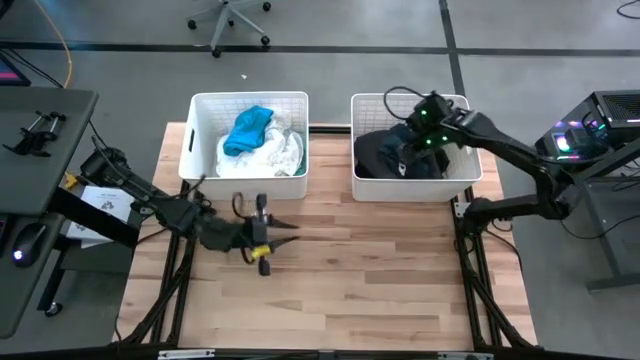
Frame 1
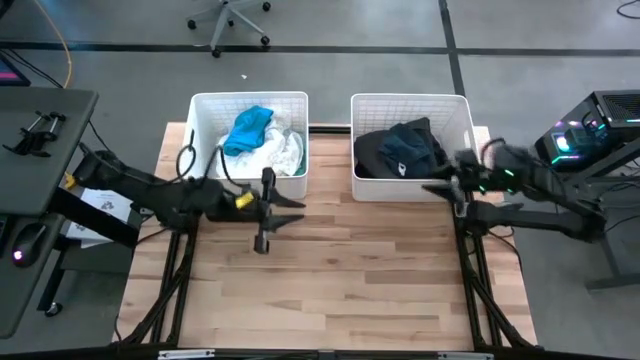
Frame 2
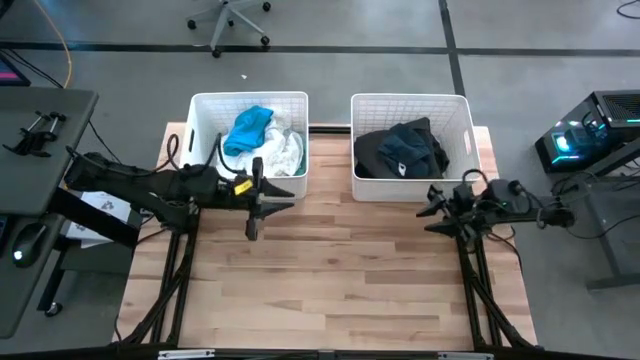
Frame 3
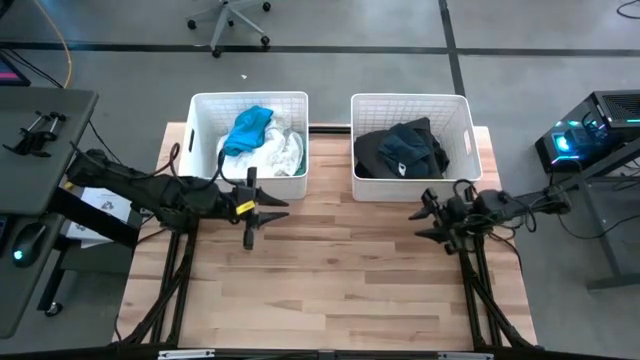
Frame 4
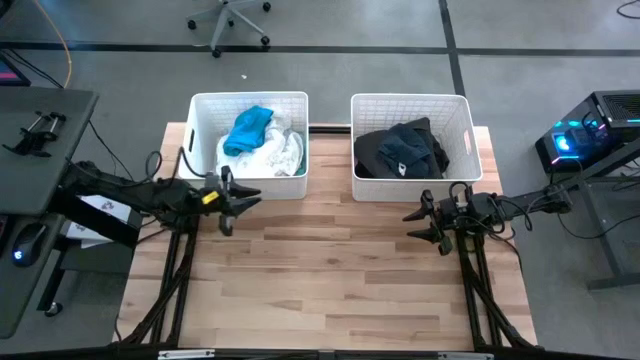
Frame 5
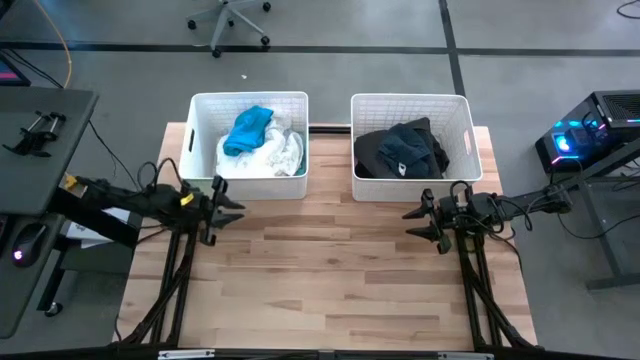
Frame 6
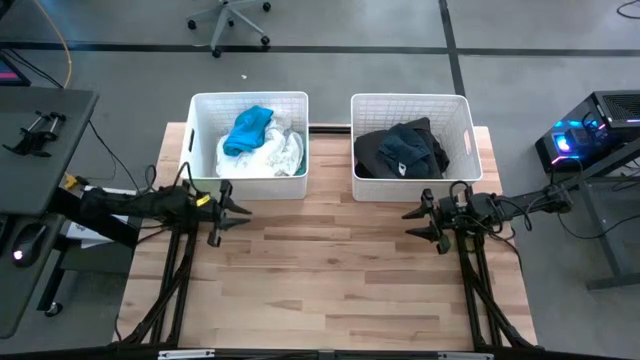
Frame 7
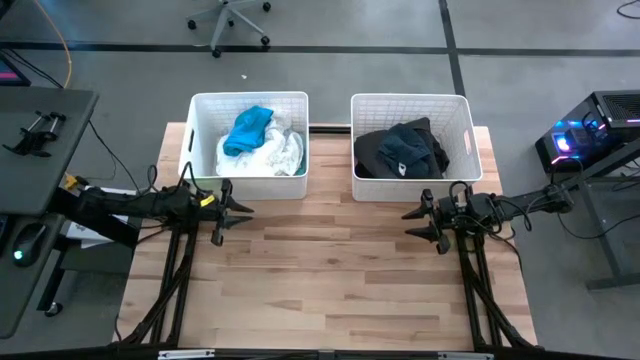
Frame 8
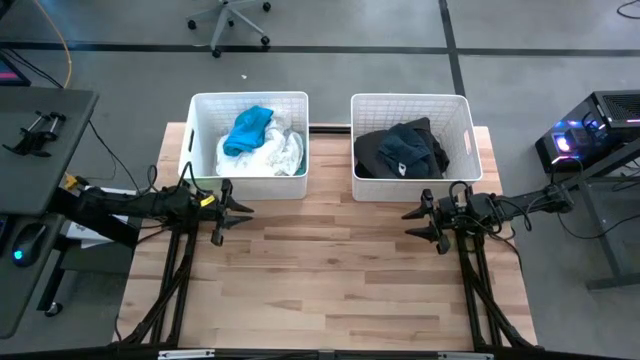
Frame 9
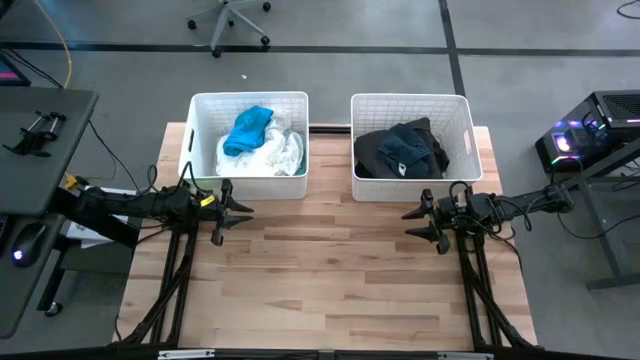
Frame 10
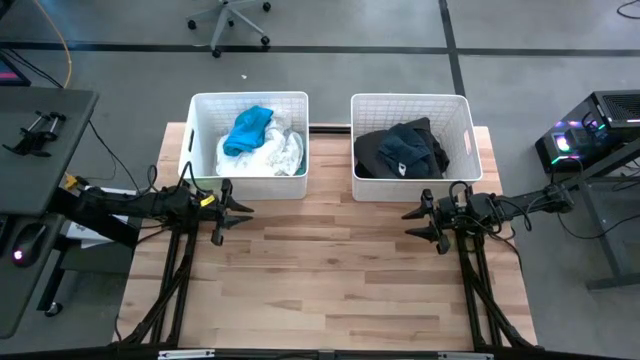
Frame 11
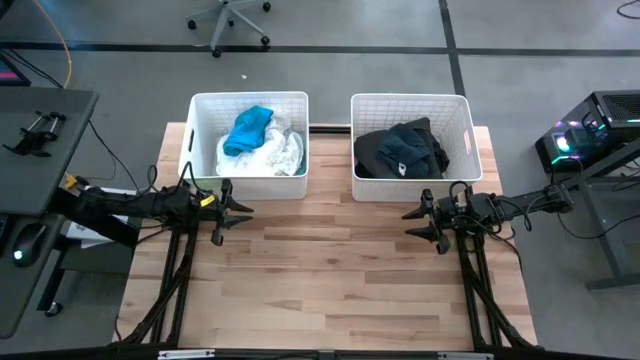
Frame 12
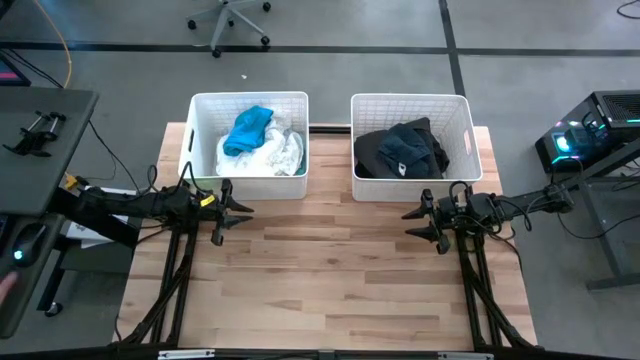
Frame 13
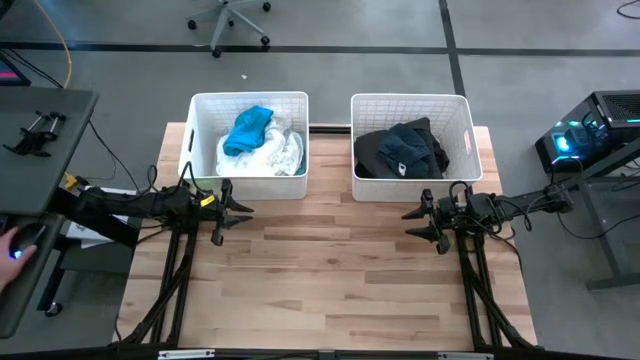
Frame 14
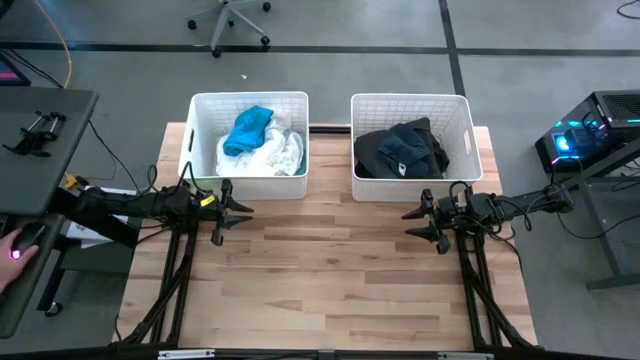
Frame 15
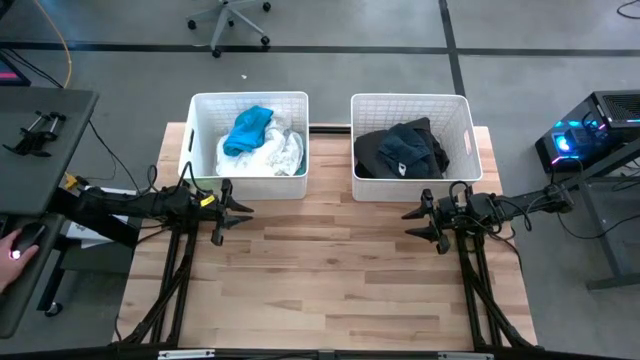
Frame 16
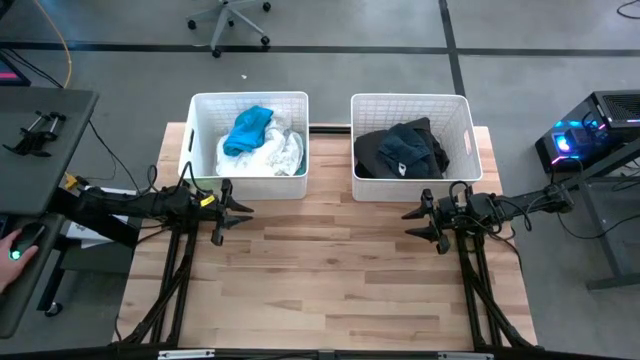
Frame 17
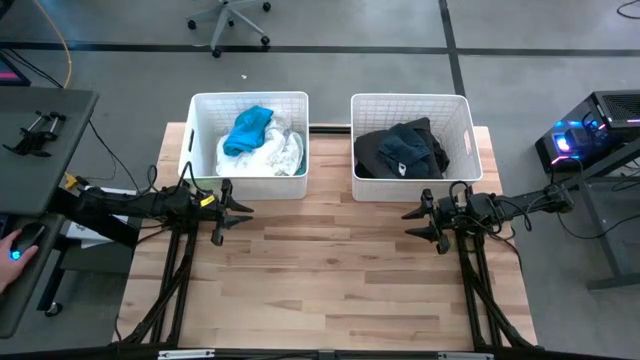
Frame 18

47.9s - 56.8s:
Task: Sort clothes
Return to Home Position

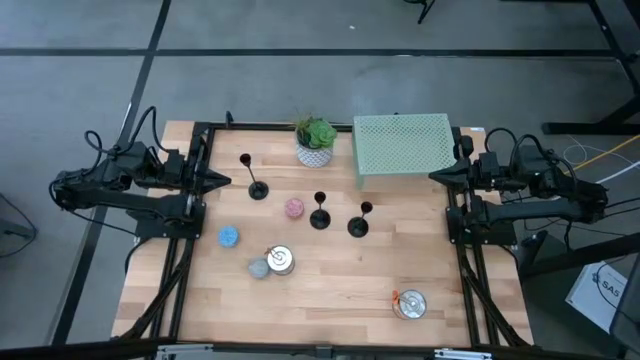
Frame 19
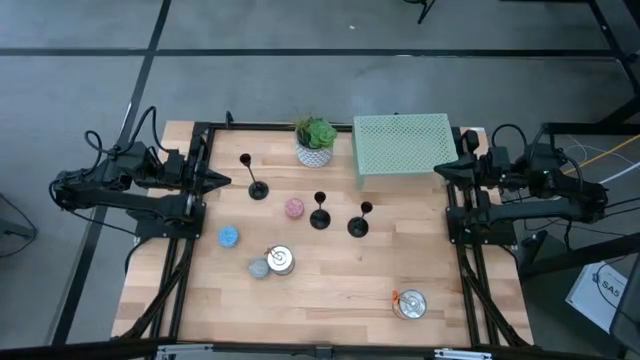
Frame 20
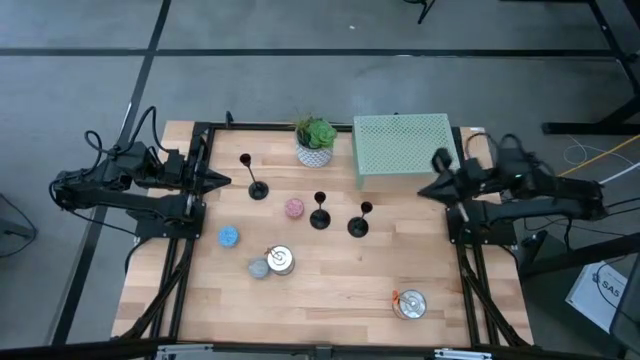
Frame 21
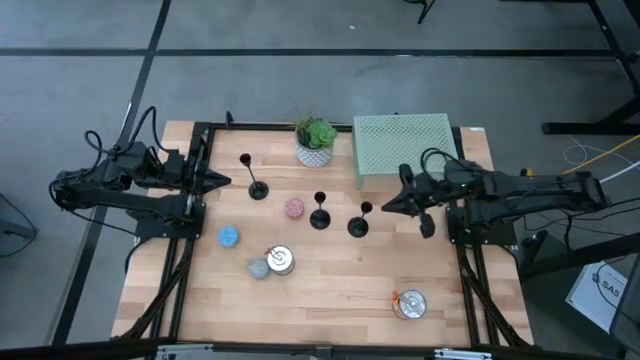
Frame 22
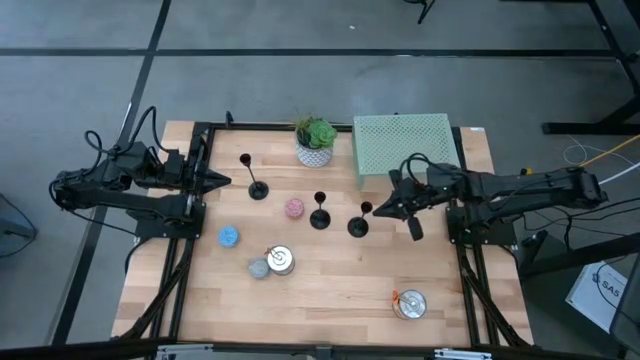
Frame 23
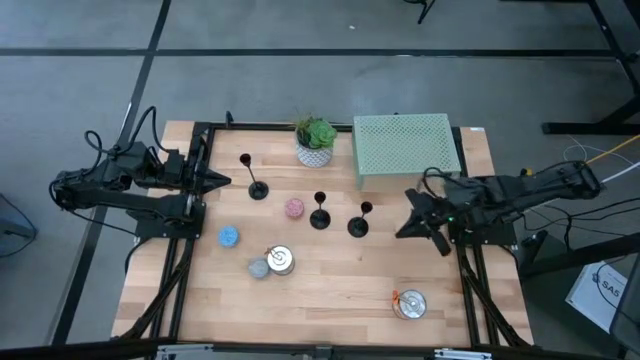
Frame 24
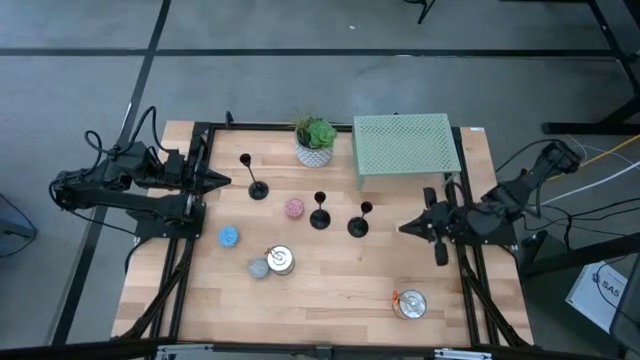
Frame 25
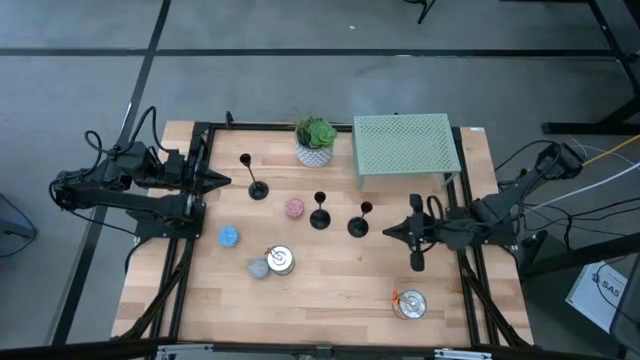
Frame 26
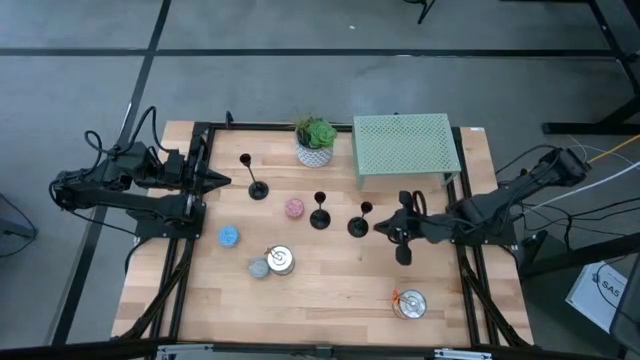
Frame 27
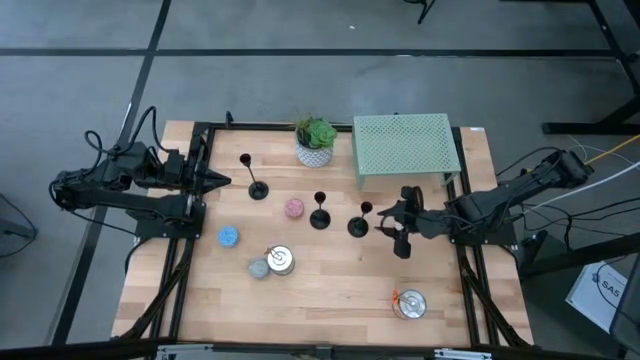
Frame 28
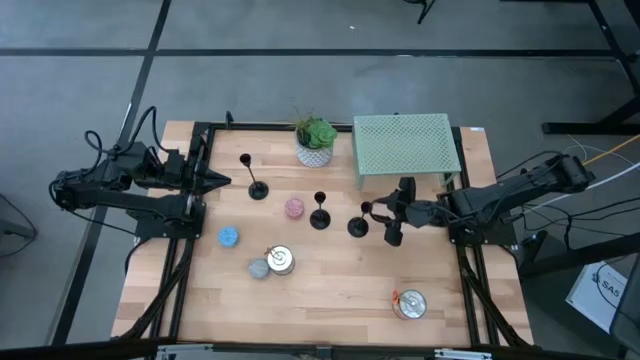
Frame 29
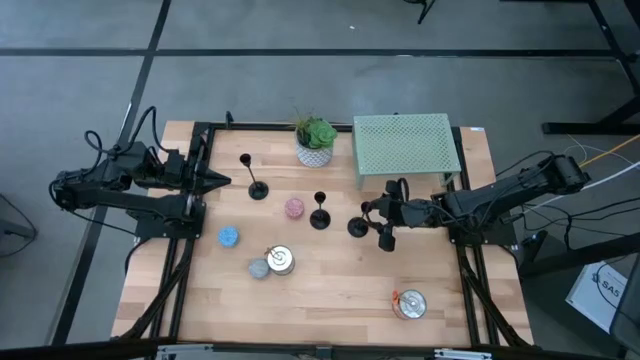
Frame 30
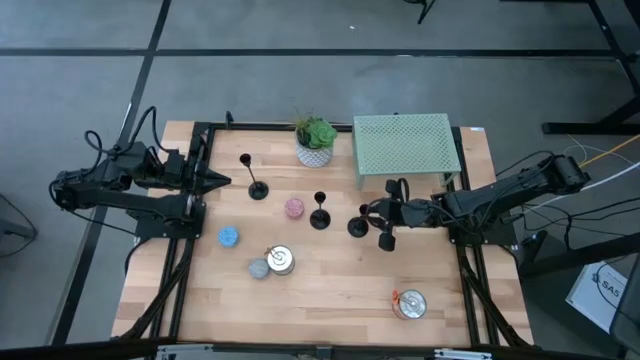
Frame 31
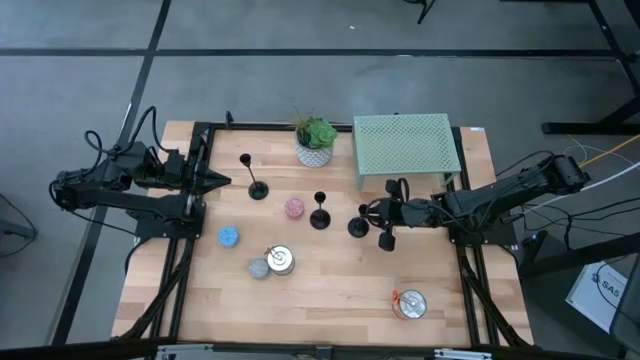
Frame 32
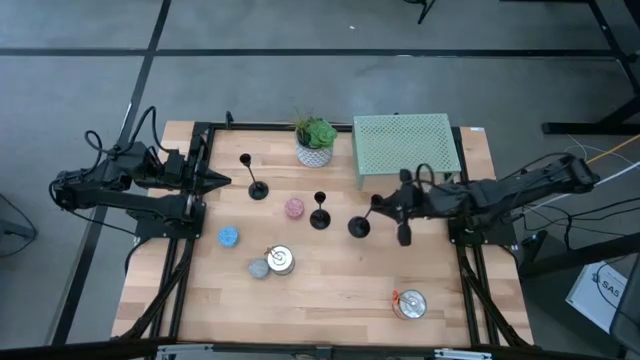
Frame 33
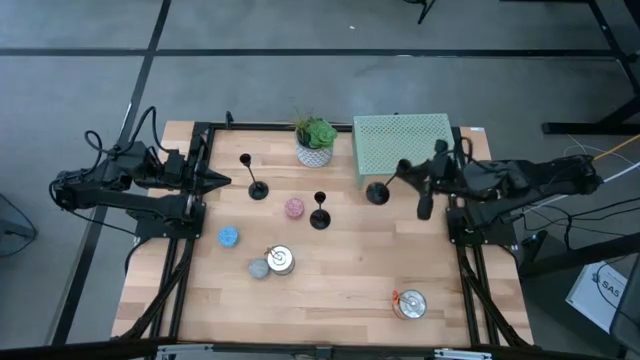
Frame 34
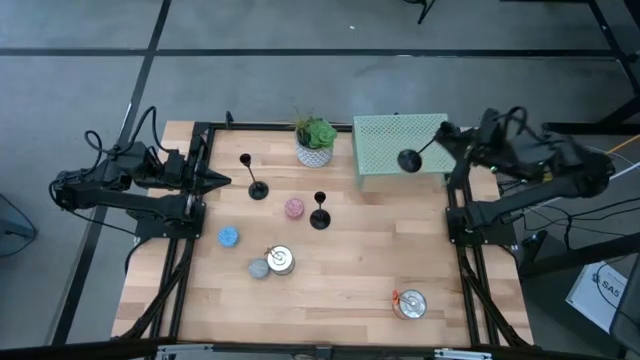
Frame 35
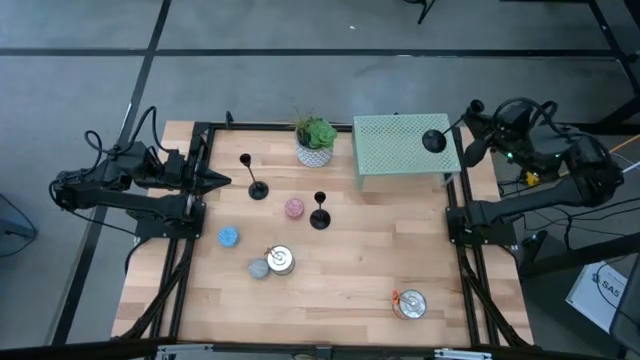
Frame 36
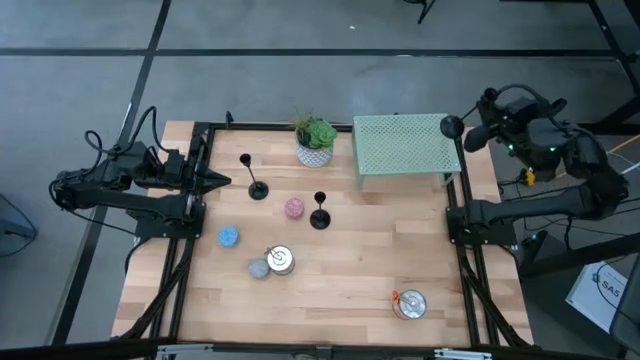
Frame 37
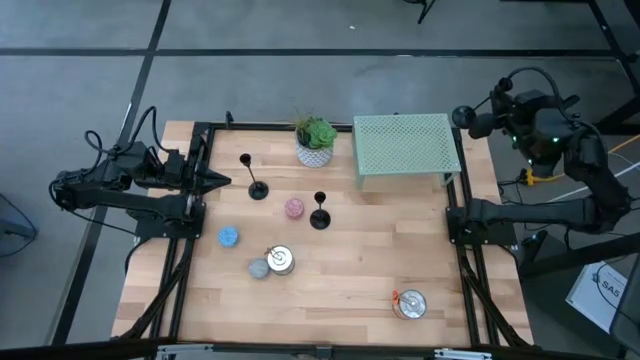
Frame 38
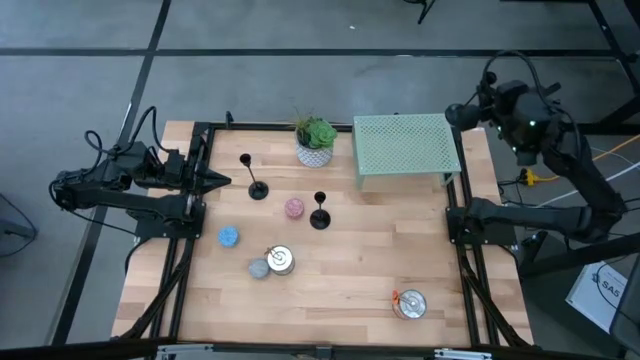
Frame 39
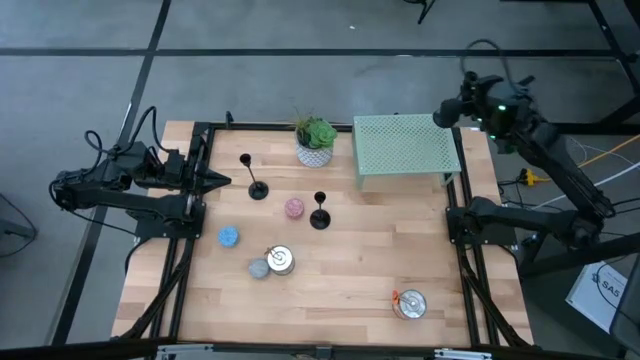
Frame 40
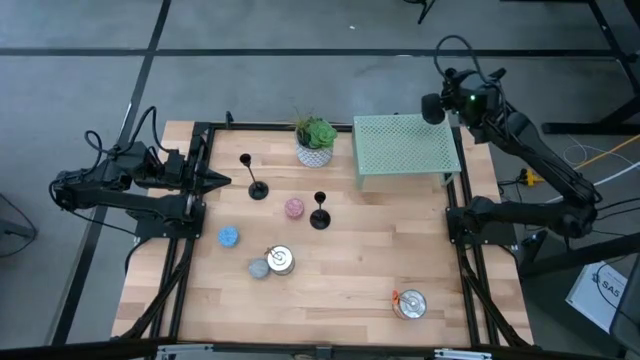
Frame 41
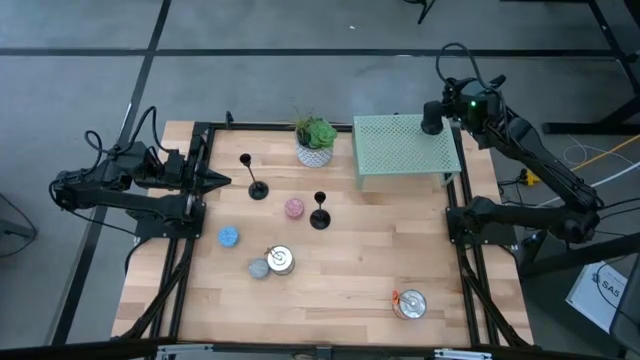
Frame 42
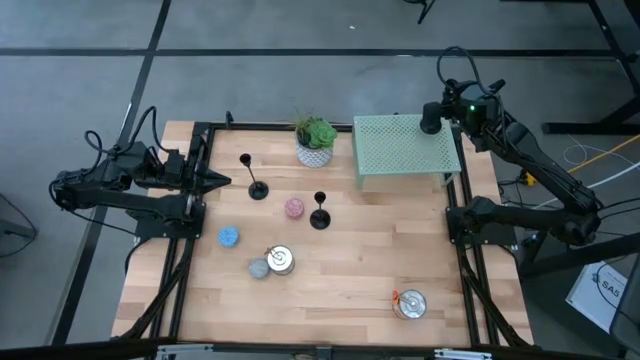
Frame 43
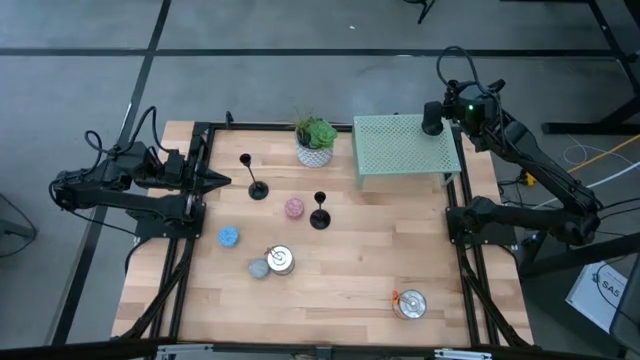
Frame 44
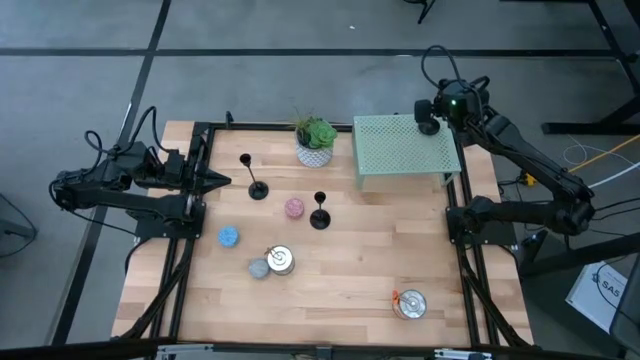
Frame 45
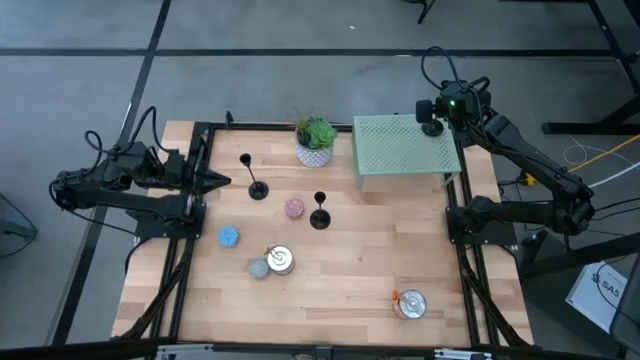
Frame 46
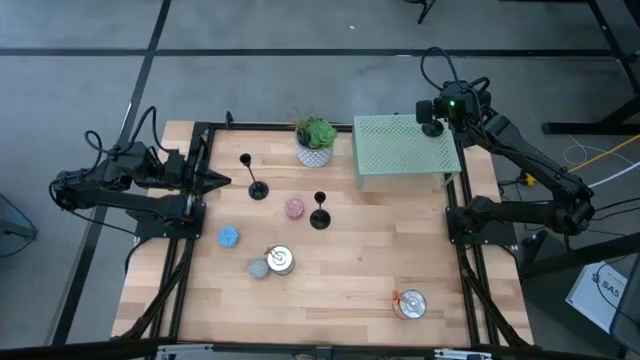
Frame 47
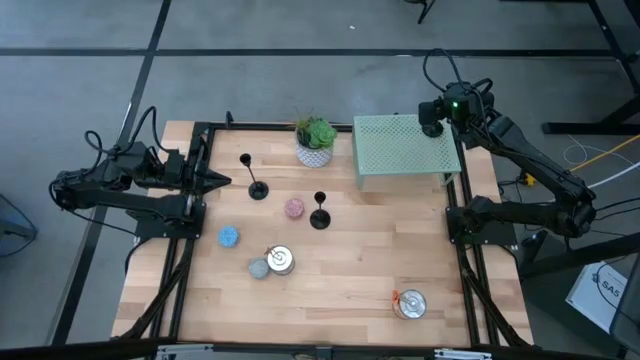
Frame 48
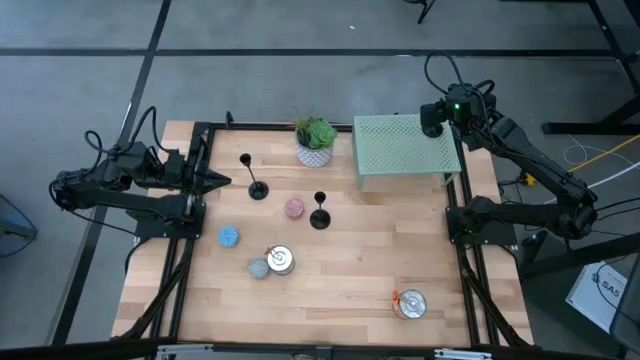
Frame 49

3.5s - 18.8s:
Task: Pick & Place candle stick holders
Put the bottom right black candle holder on the shelf
